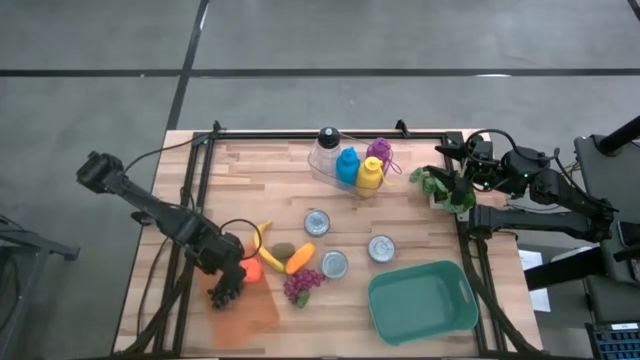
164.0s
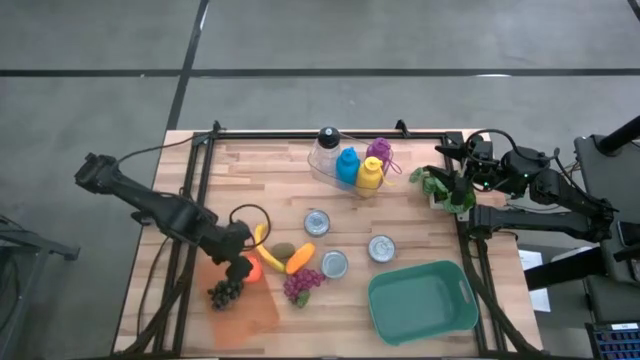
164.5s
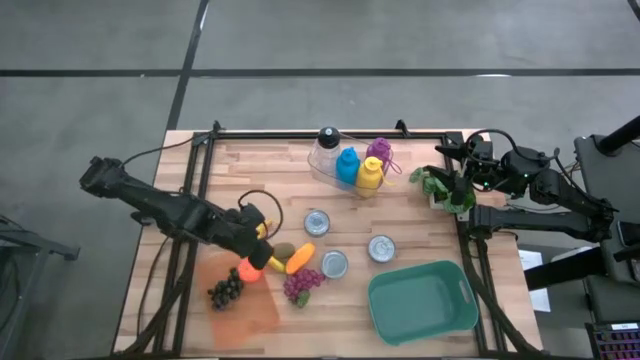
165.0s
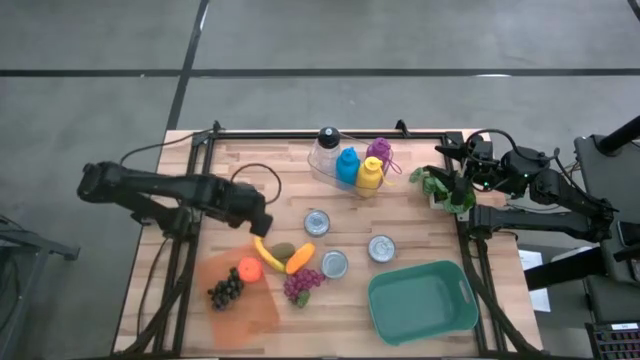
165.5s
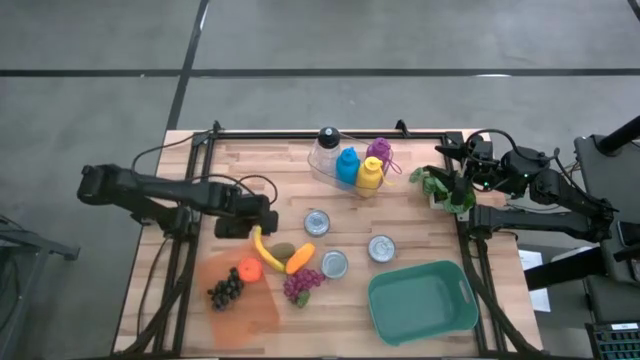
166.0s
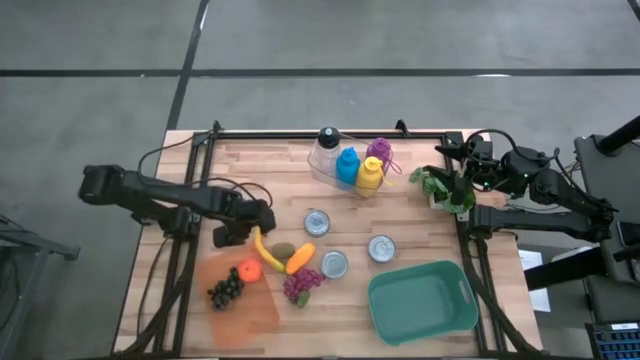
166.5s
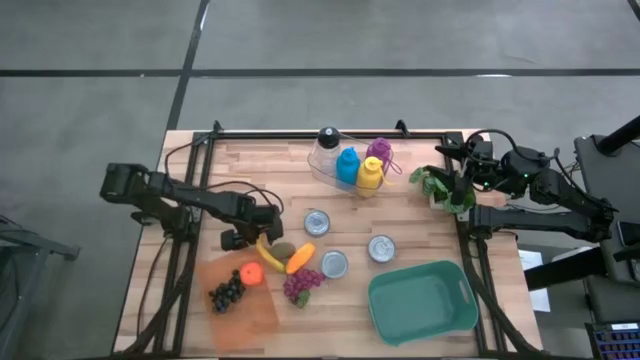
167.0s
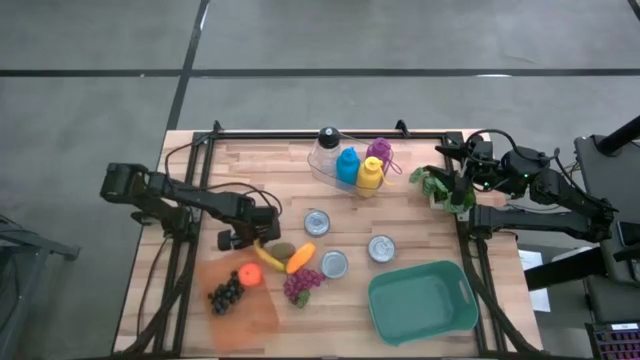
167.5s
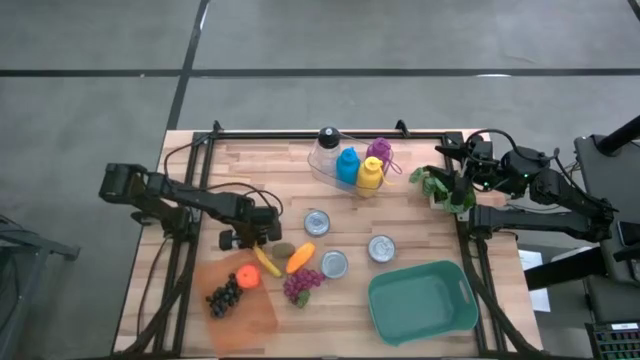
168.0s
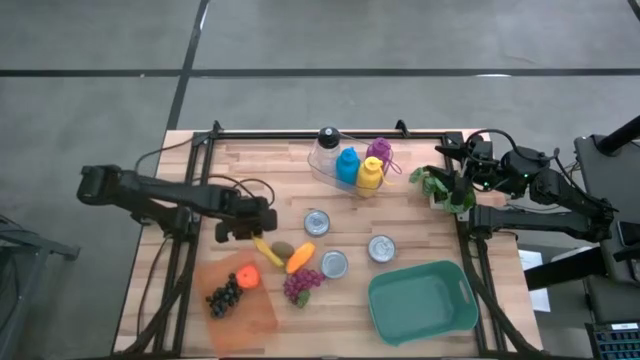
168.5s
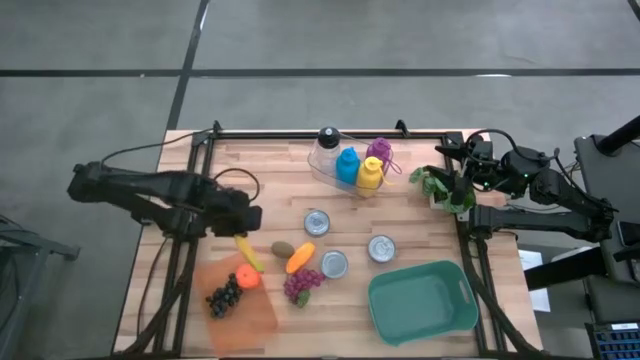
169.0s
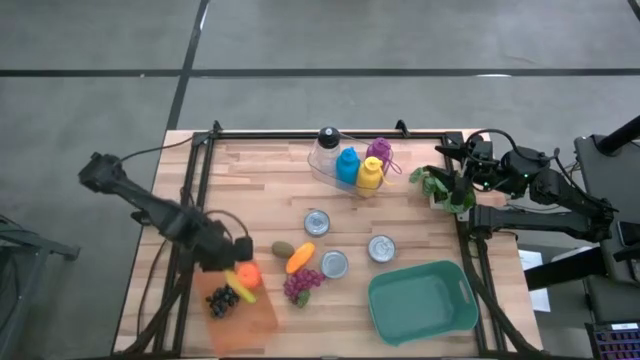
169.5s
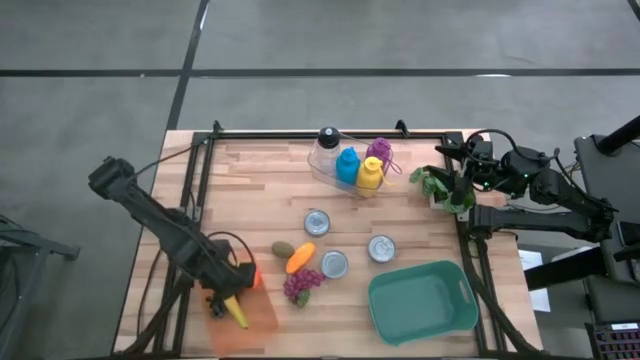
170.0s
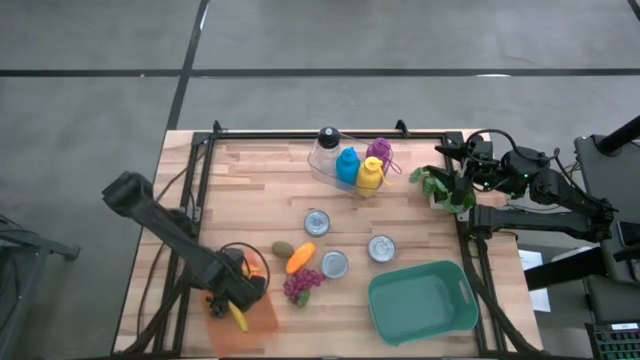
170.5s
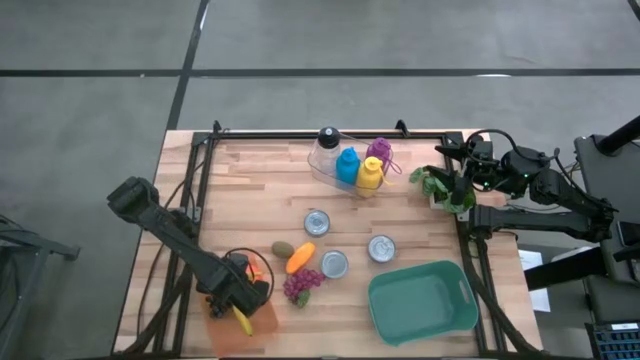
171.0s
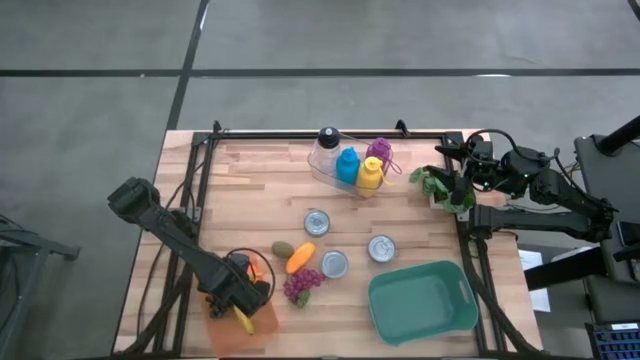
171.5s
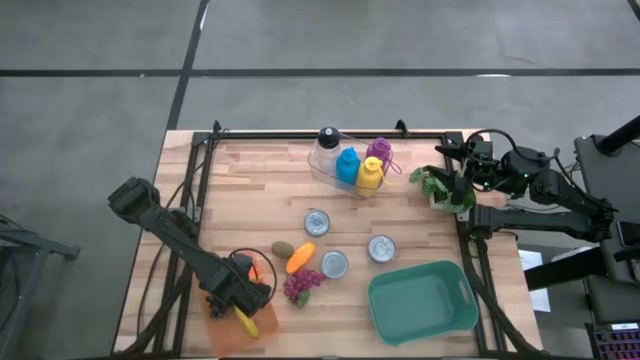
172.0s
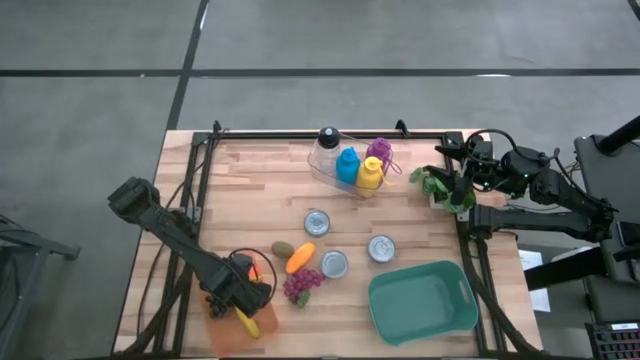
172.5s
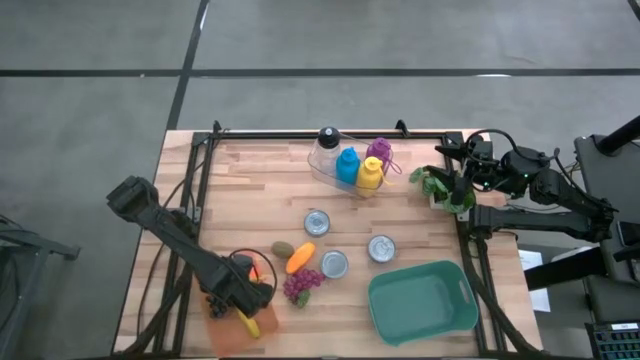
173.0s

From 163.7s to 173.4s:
Task: Pick & Place Food Item
Put the banana into the orange bin

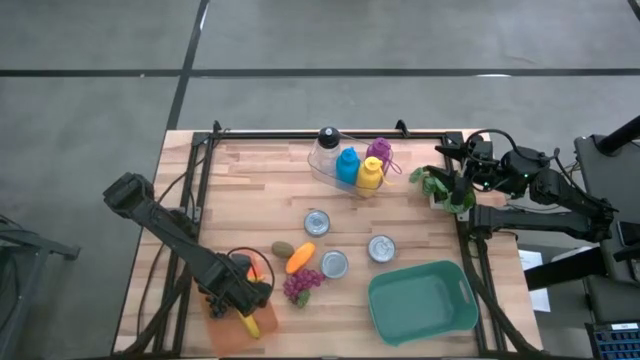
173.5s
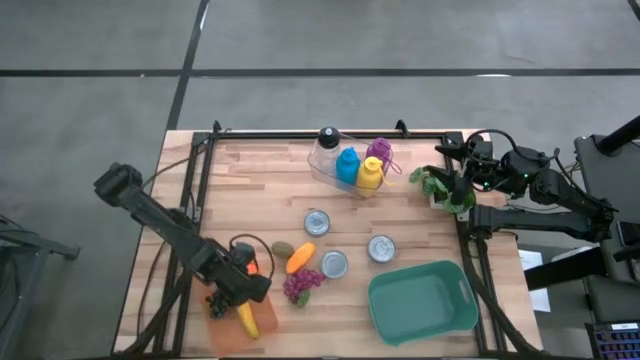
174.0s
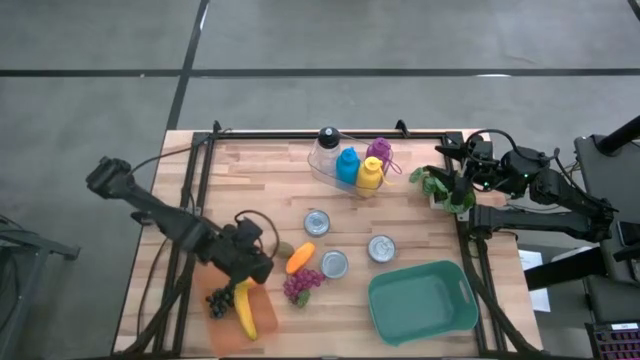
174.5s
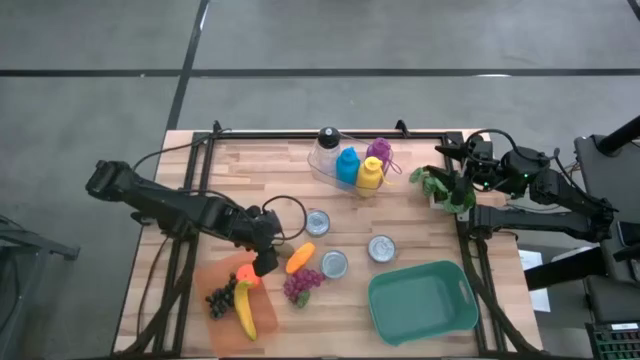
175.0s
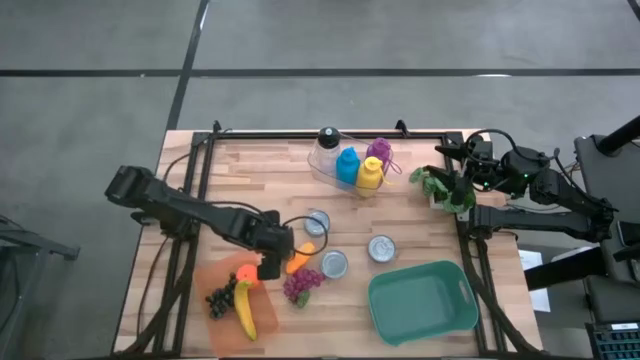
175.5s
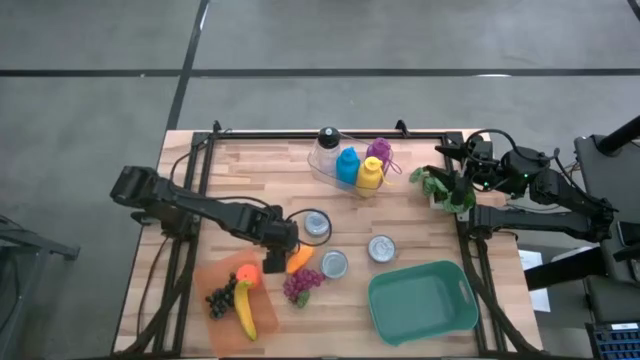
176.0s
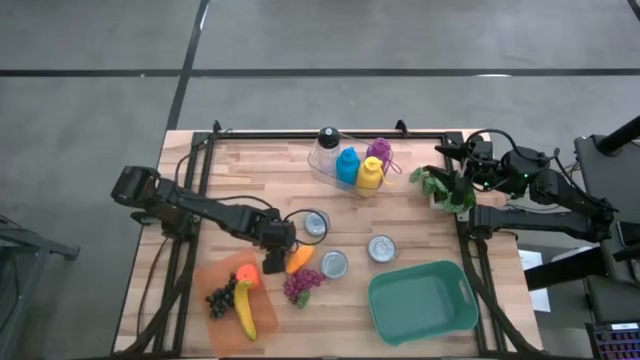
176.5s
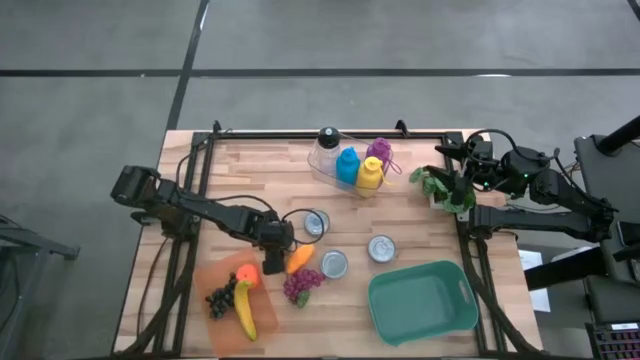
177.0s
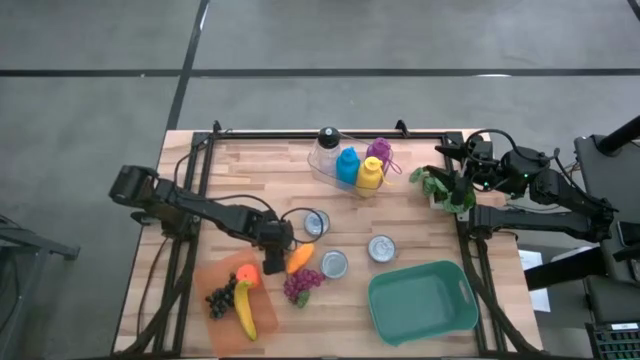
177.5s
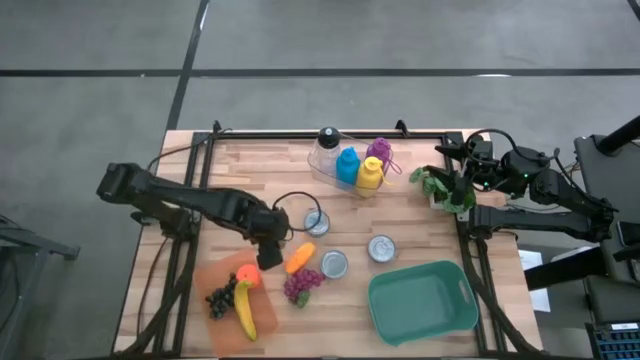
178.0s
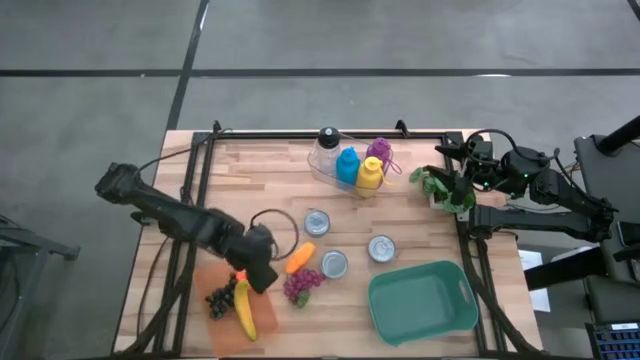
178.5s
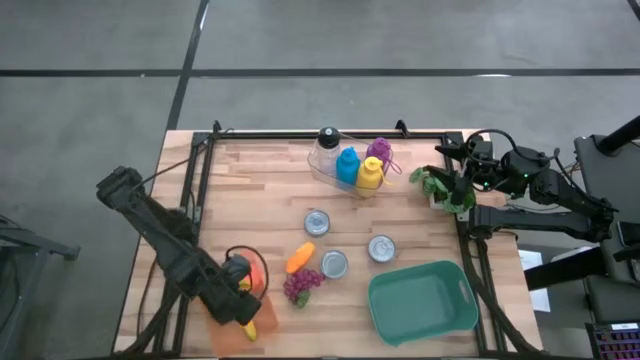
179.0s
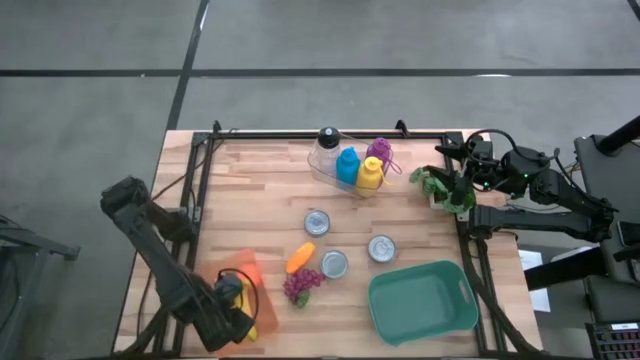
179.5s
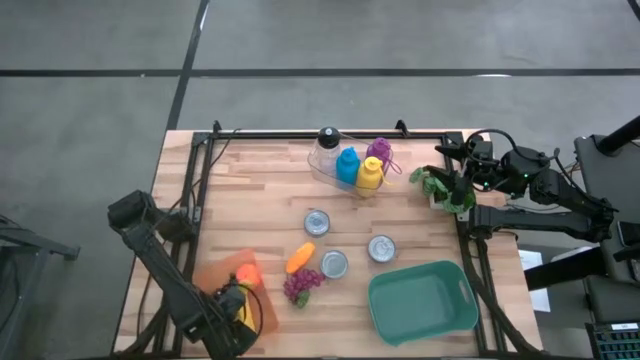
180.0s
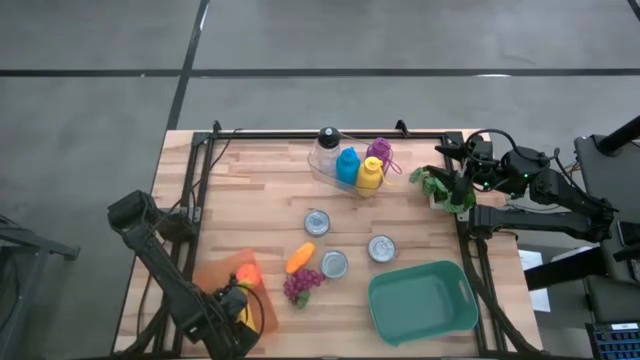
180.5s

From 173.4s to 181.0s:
Put the kiwi into the orange bin

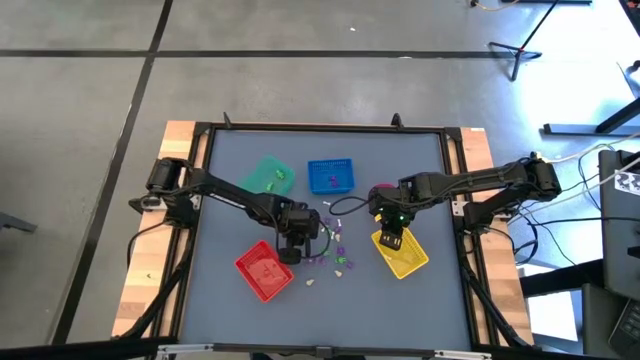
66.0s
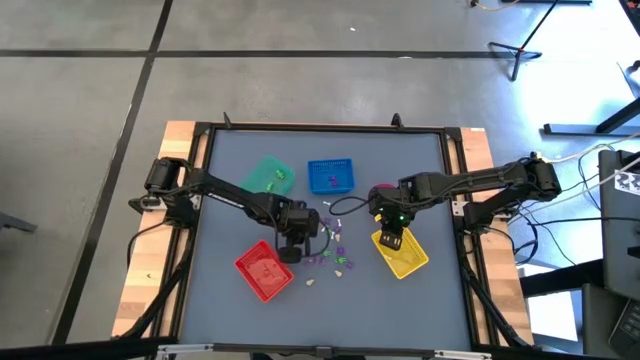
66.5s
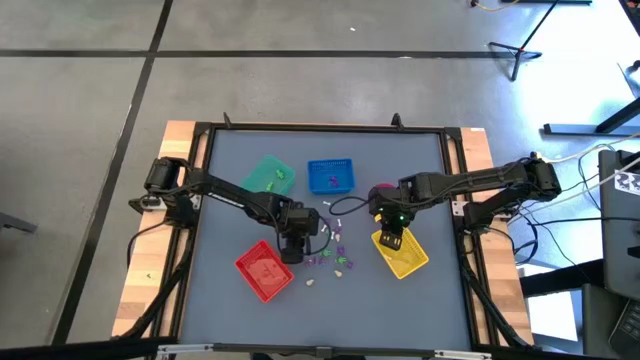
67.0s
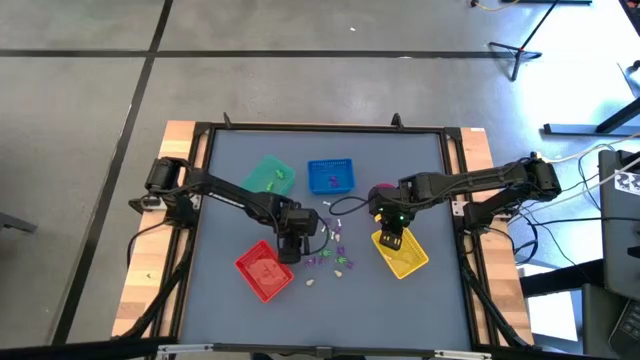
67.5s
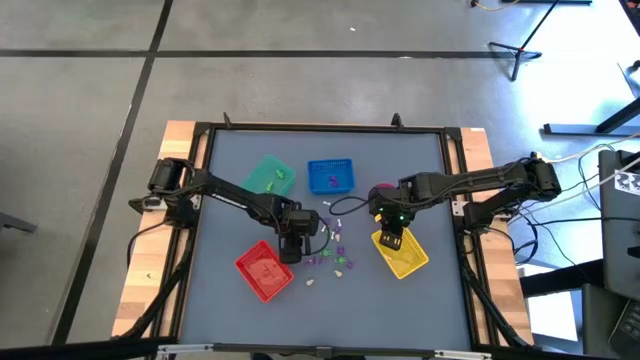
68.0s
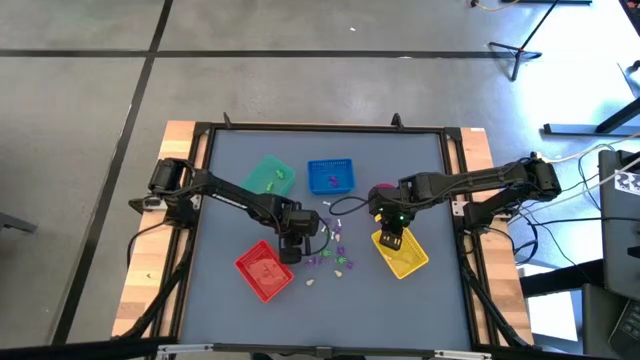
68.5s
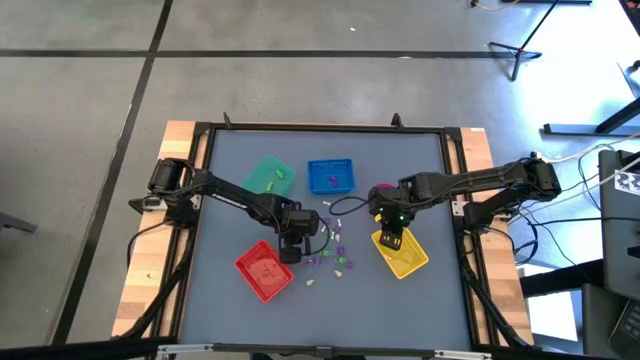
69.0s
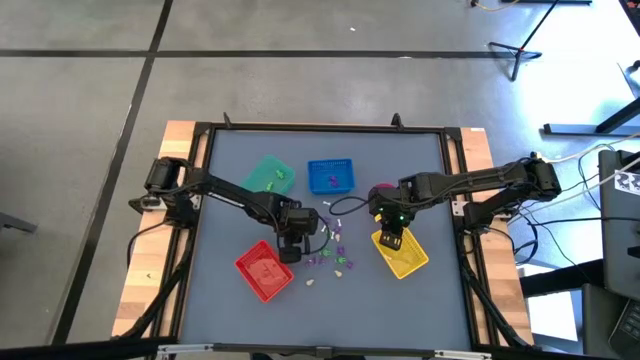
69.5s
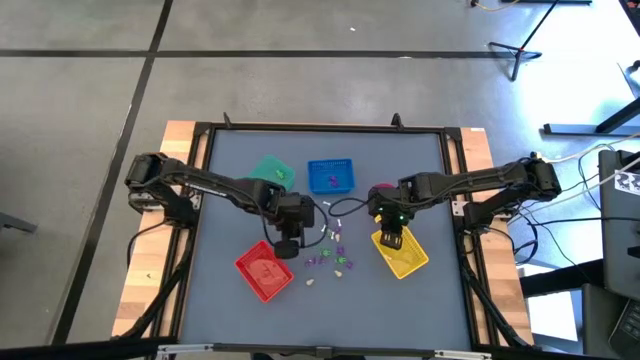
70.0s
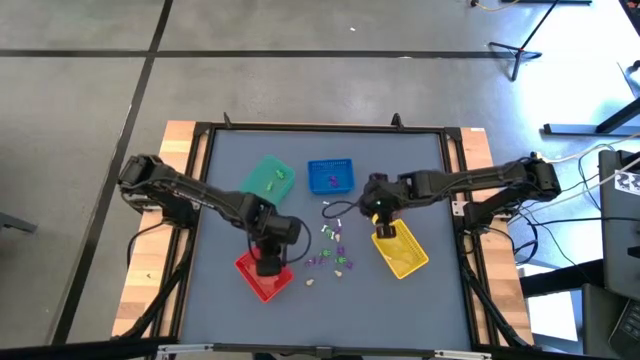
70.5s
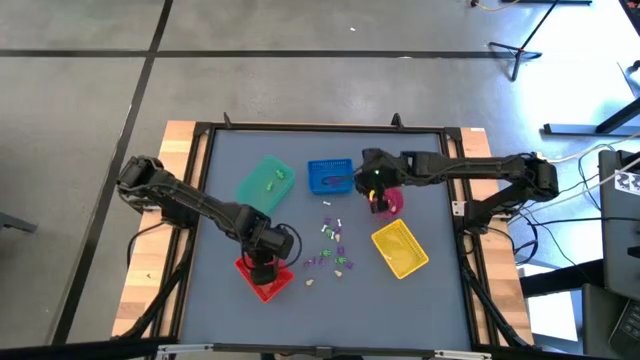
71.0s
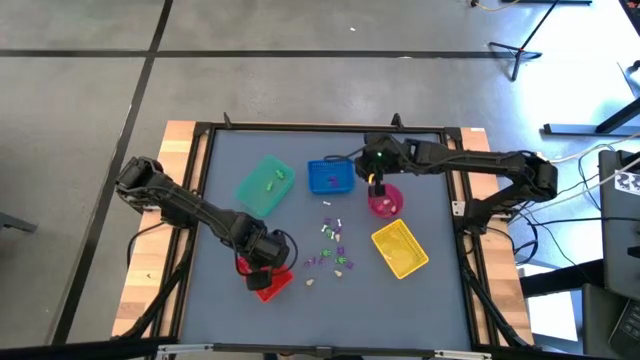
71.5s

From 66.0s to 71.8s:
Task: Sort Halloween decoration
Put the purple witch hat toy into the orange bin
